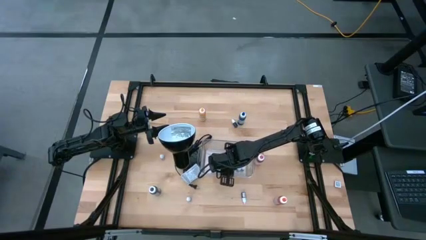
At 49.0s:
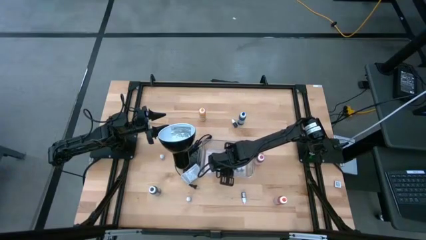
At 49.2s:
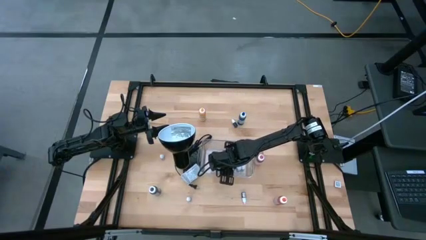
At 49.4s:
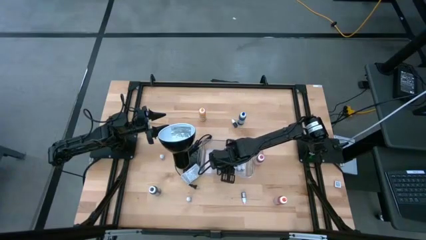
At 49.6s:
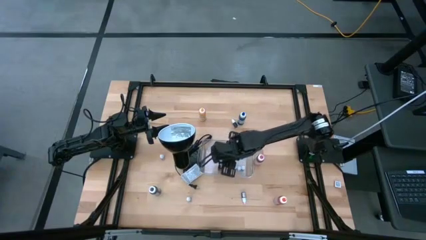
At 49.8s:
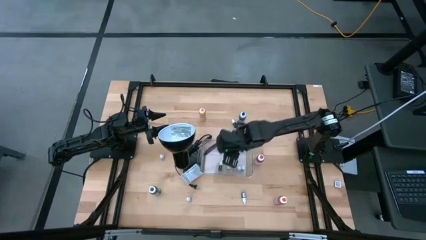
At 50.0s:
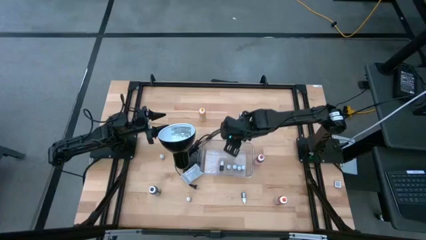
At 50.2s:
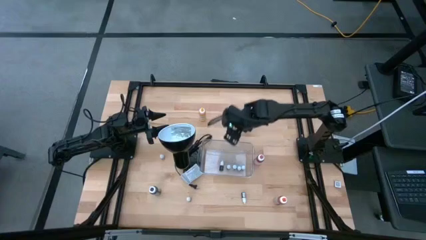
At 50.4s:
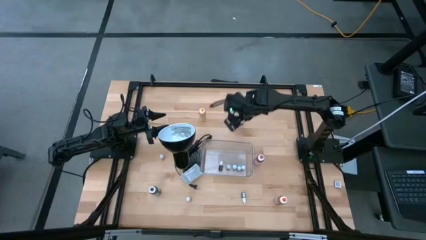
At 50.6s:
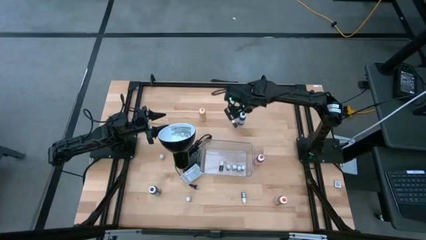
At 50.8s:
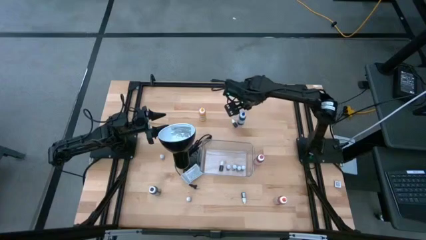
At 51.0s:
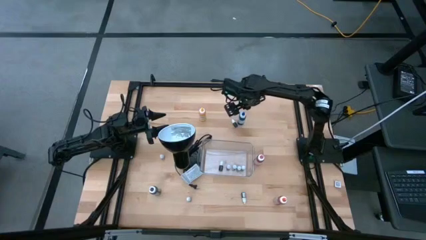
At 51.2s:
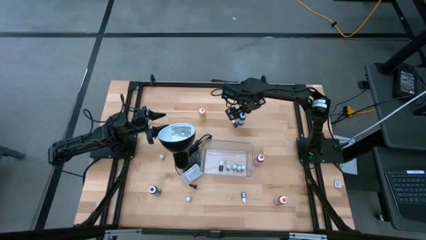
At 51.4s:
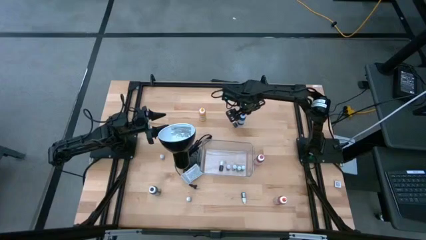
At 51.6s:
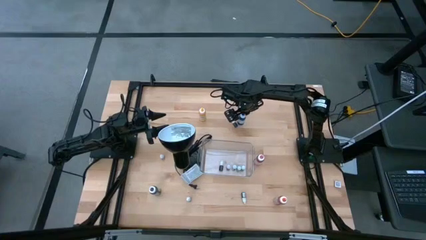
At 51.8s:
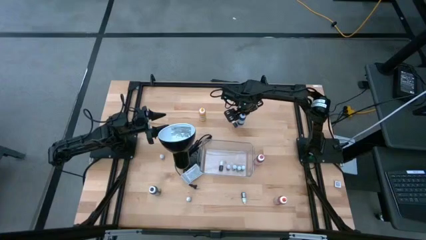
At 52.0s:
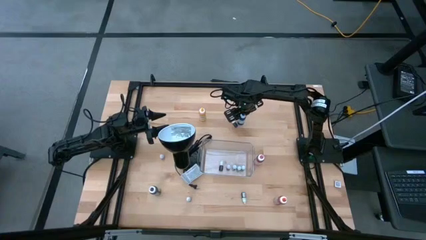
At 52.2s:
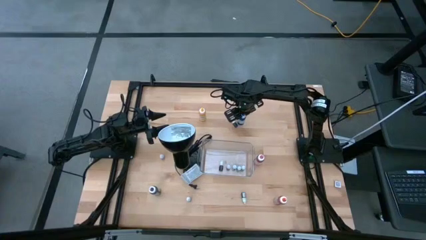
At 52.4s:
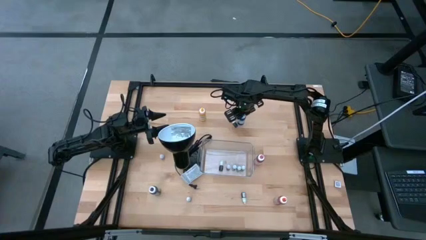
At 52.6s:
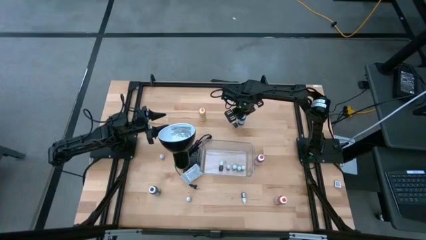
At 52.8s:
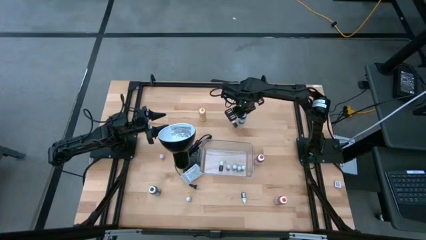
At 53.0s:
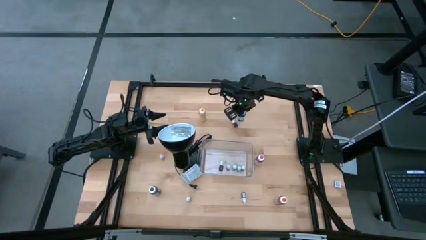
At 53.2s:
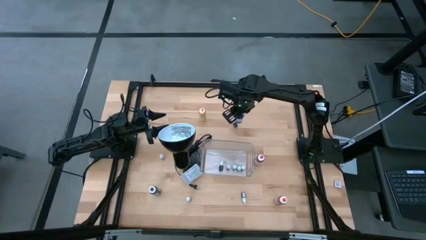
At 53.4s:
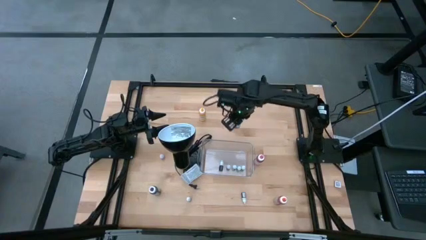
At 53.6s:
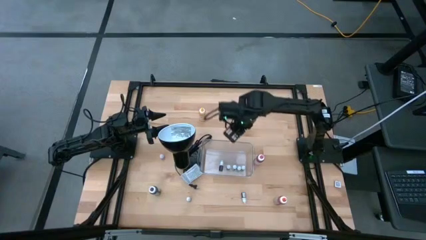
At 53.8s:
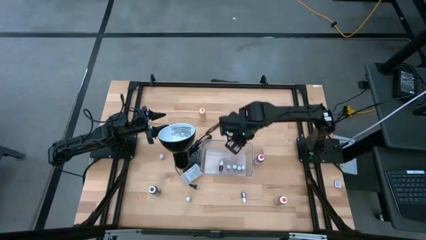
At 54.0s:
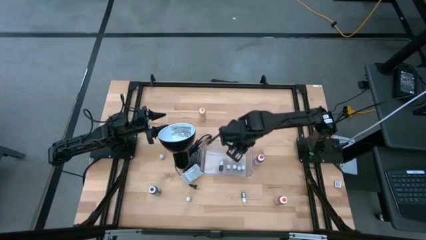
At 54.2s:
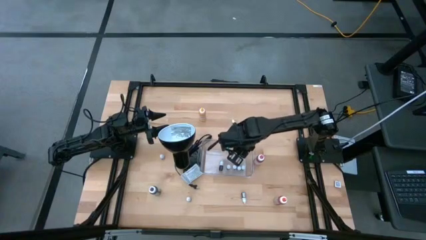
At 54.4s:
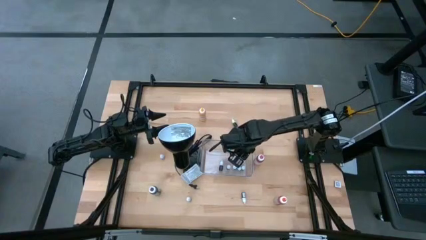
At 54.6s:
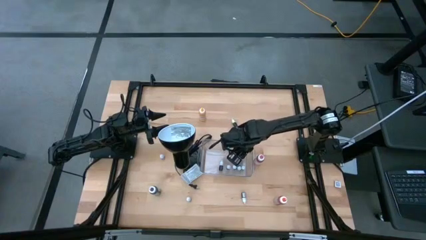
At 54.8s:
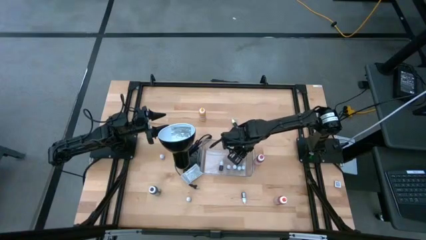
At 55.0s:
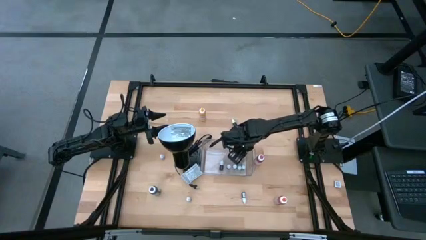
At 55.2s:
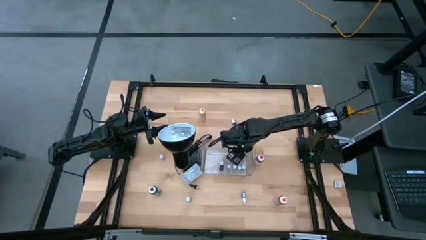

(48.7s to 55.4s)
Task: Pick & Place food coloring
Put the big blue food coloring bottle into the transparent bin

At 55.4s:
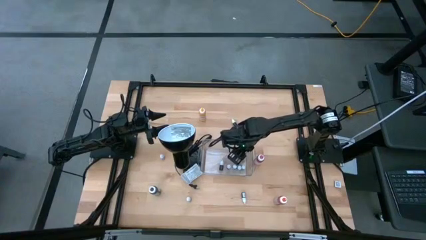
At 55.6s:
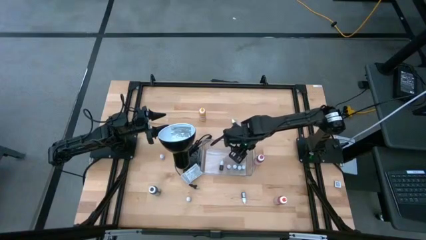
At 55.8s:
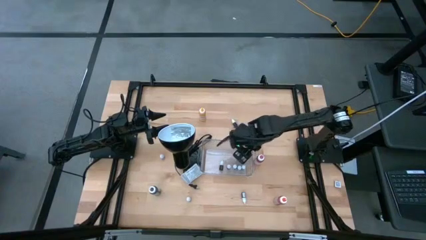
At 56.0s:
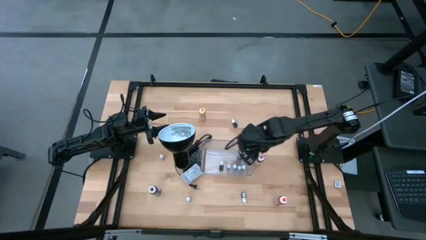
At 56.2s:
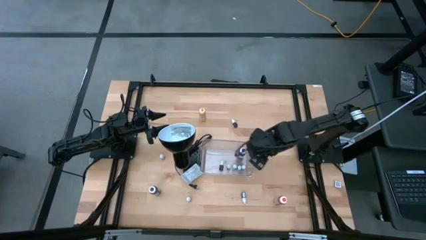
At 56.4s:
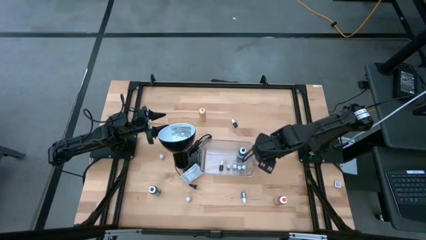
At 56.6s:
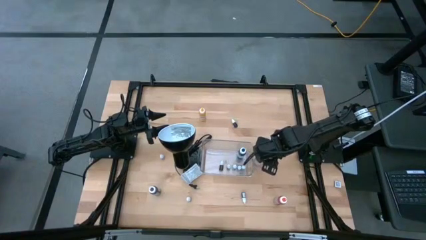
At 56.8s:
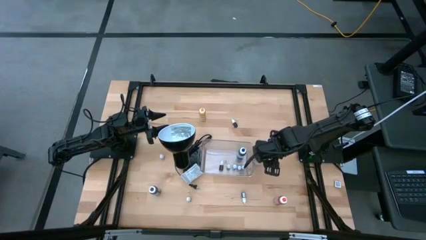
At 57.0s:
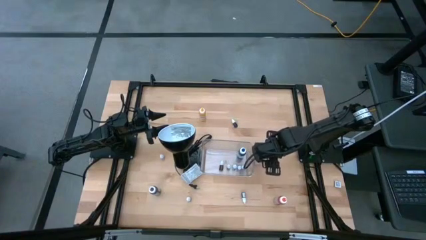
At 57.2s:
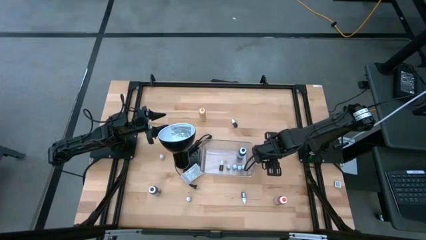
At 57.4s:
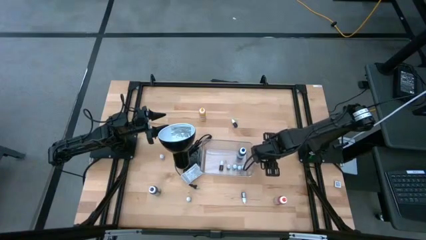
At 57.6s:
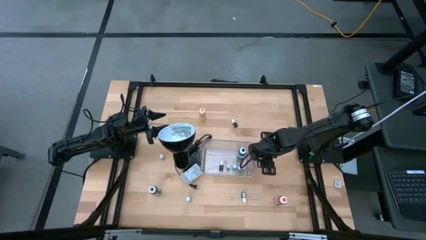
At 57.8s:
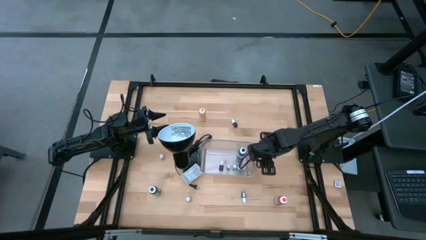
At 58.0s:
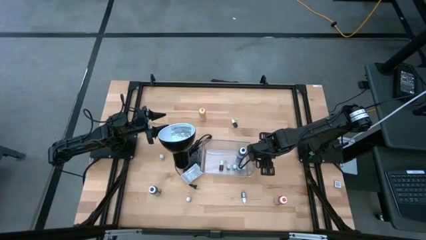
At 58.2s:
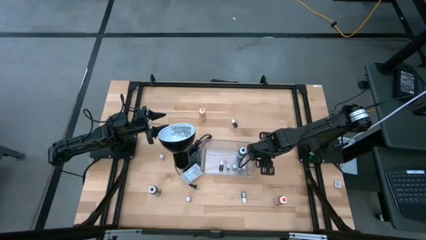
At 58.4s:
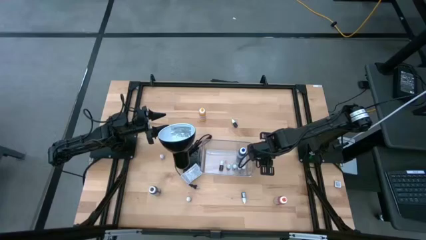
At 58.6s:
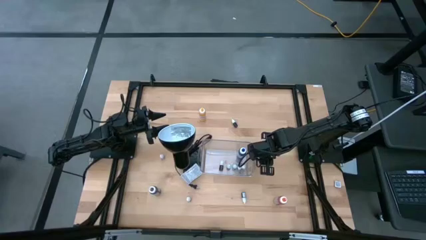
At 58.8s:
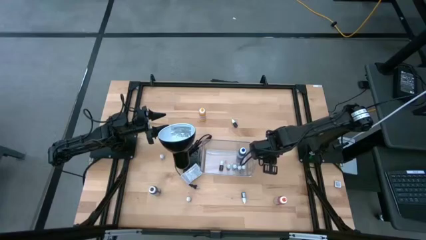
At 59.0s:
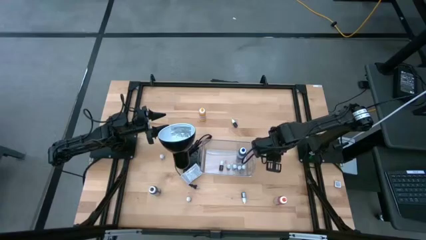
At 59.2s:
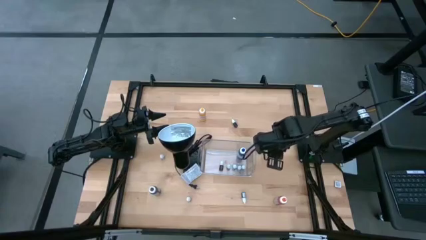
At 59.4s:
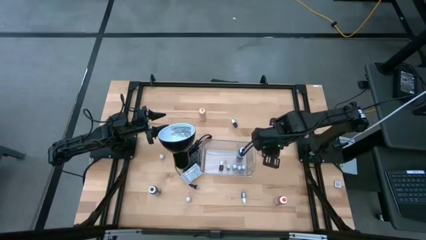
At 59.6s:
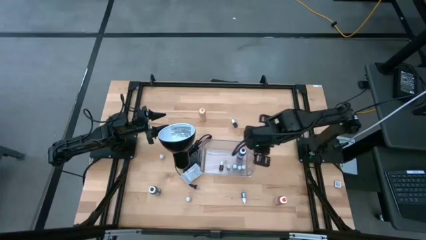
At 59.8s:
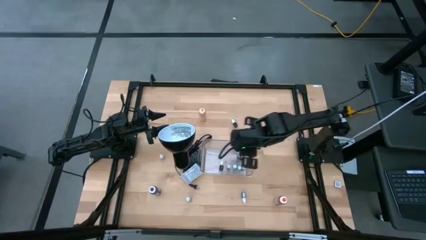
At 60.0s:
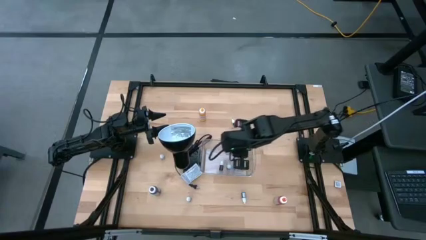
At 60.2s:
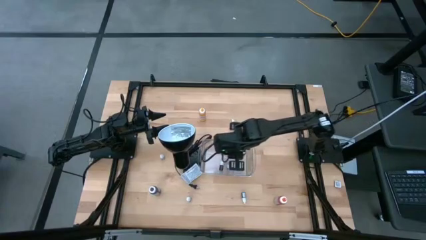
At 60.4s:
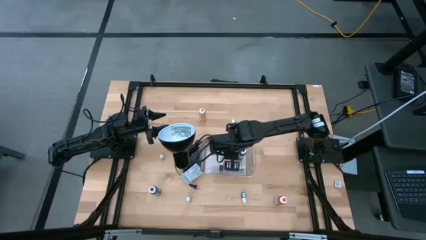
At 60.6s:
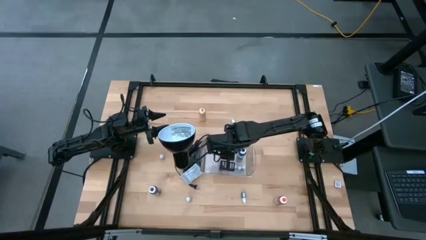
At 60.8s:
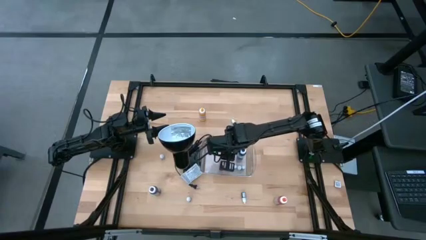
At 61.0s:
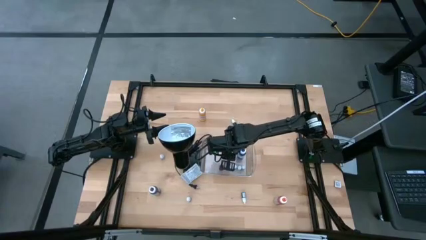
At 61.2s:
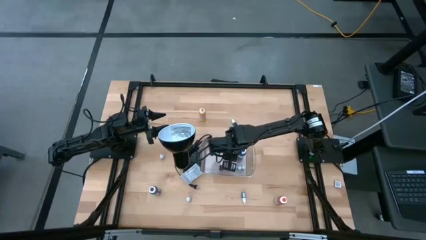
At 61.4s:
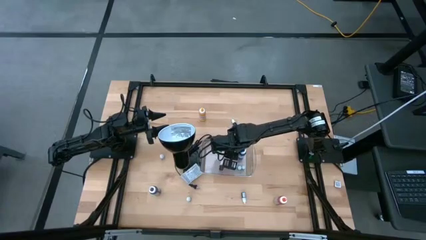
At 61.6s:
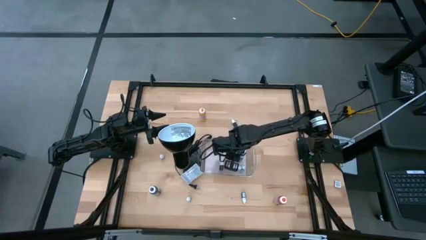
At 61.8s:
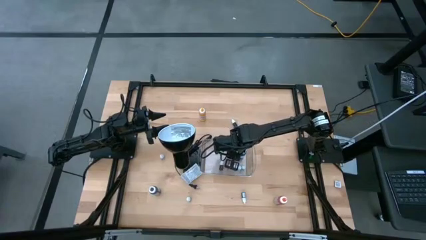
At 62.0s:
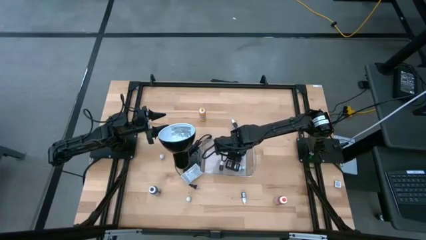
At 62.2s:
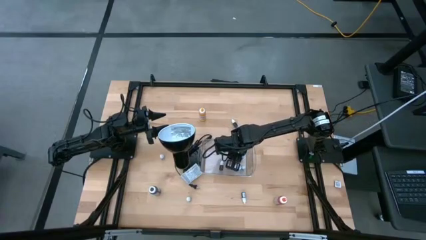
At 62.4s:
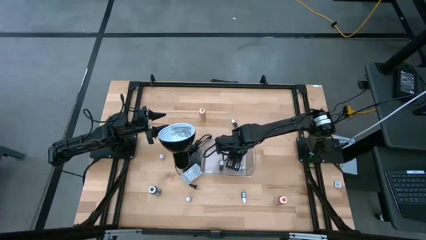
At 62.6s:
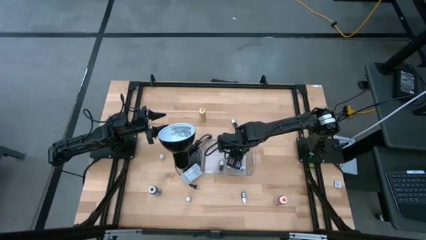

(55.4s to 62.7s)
Put the big pink food coloring bottle into the transparent bin
